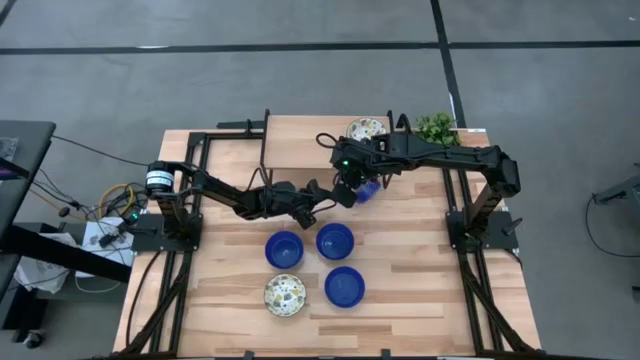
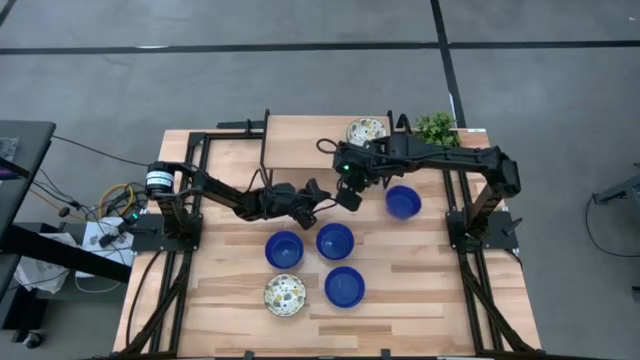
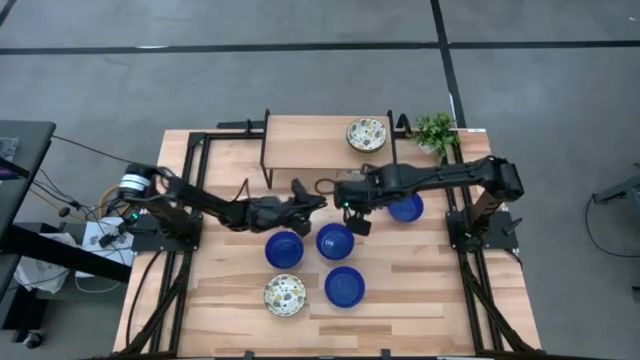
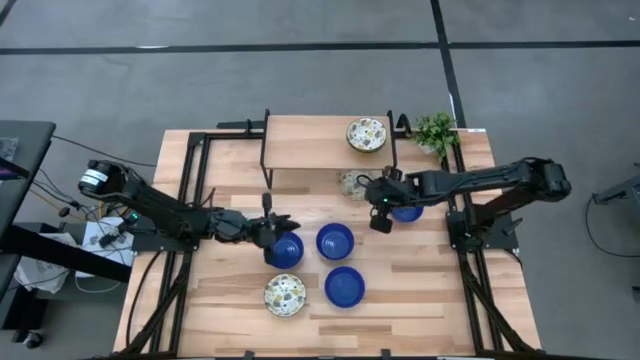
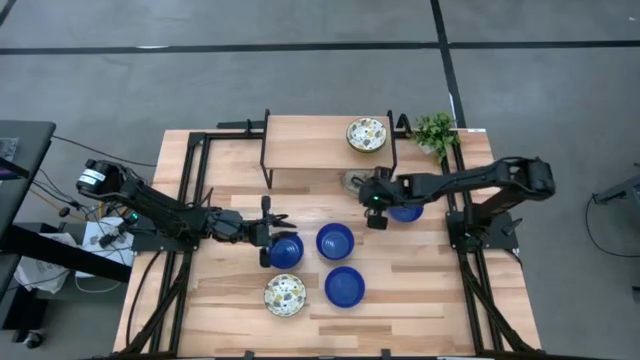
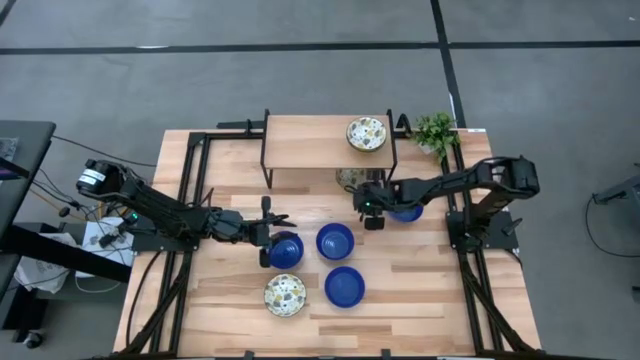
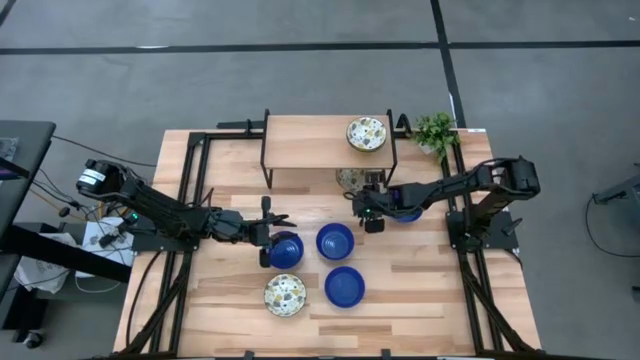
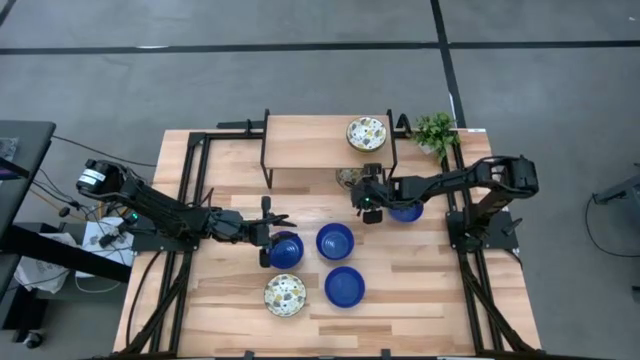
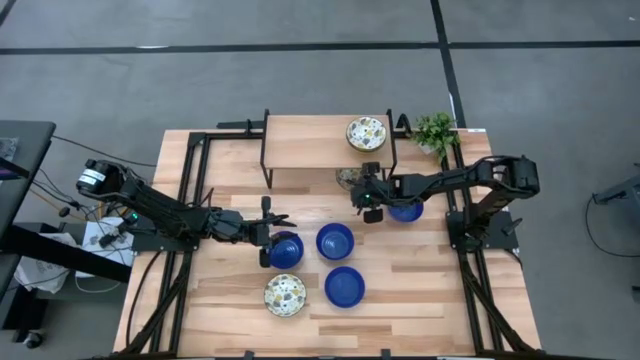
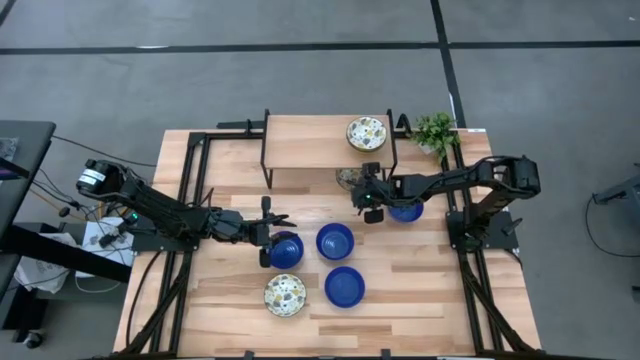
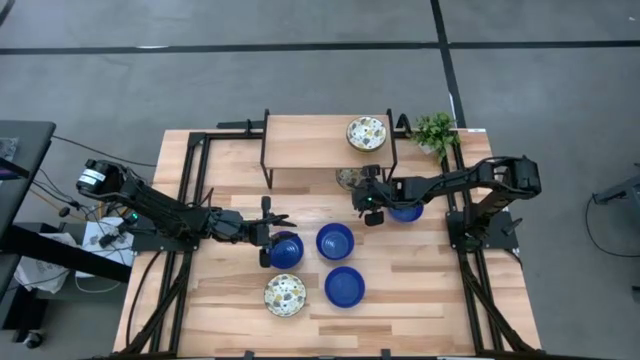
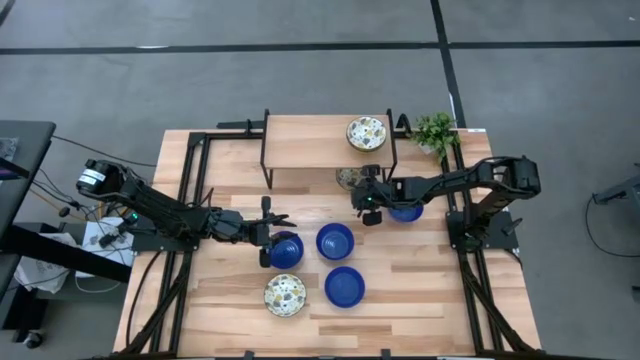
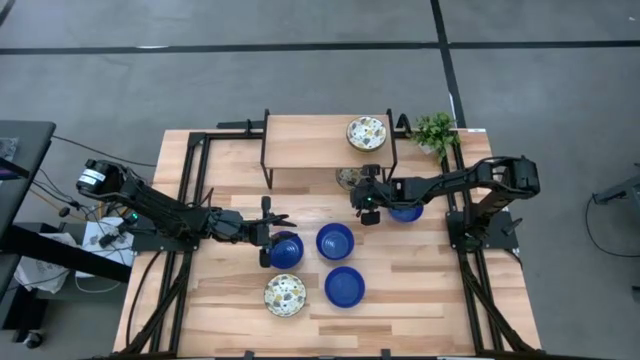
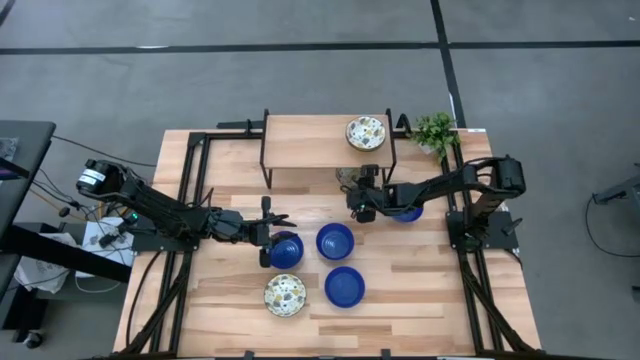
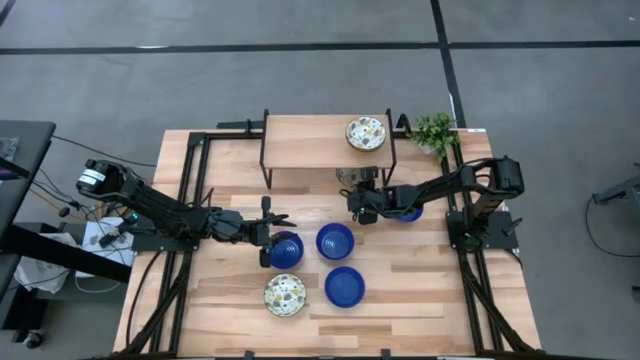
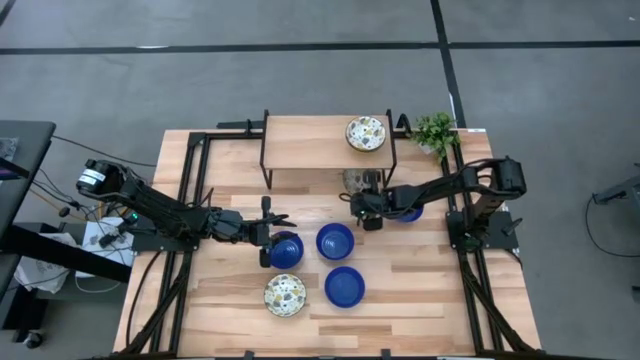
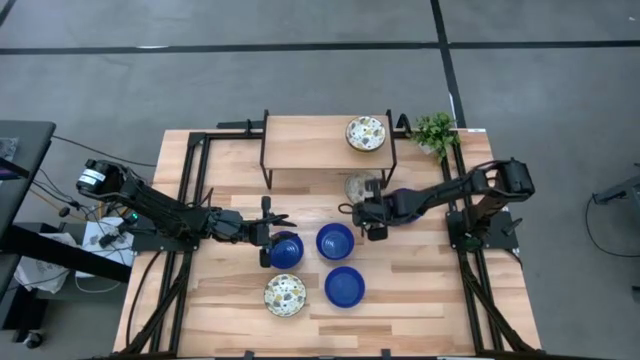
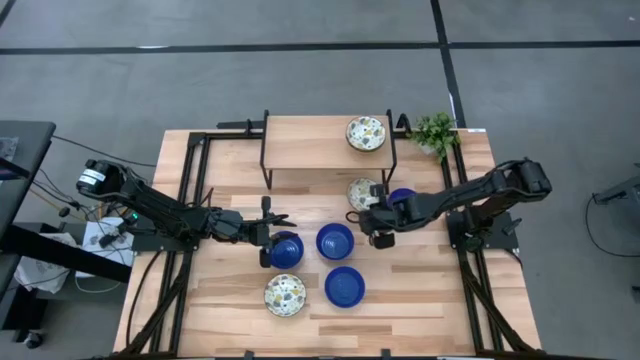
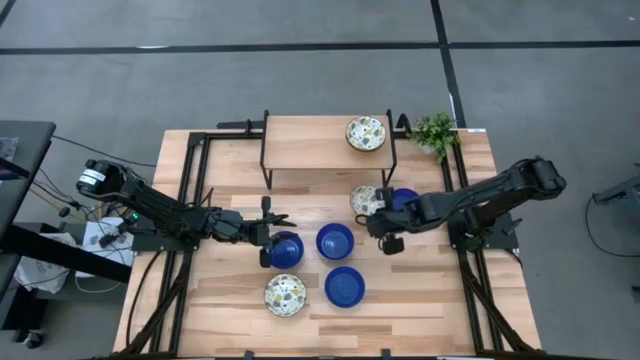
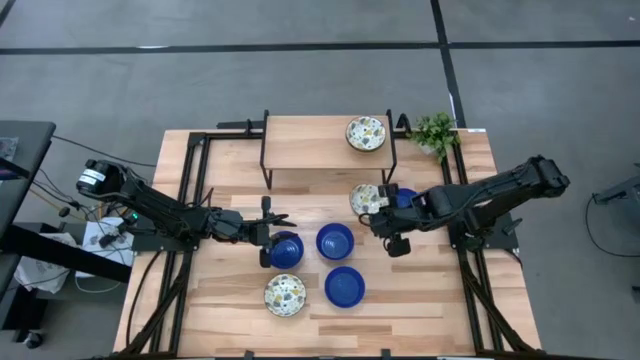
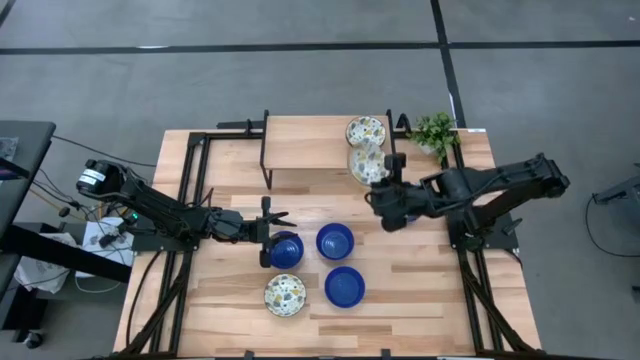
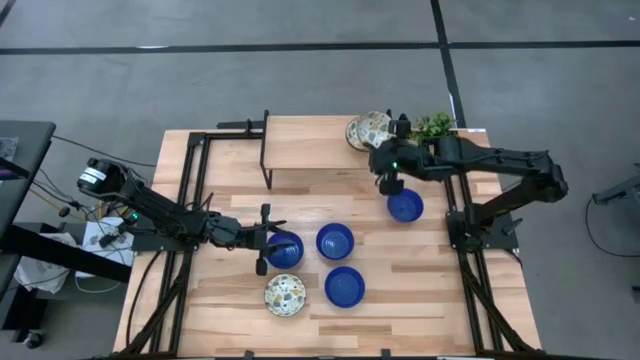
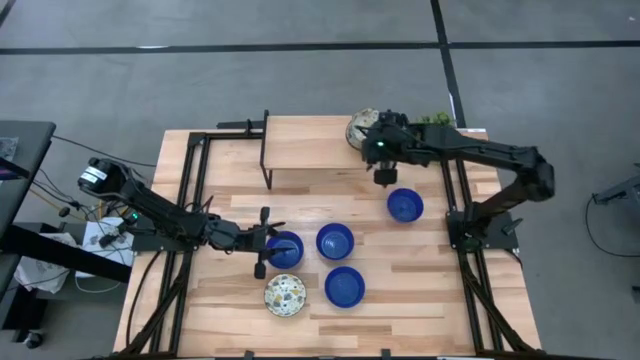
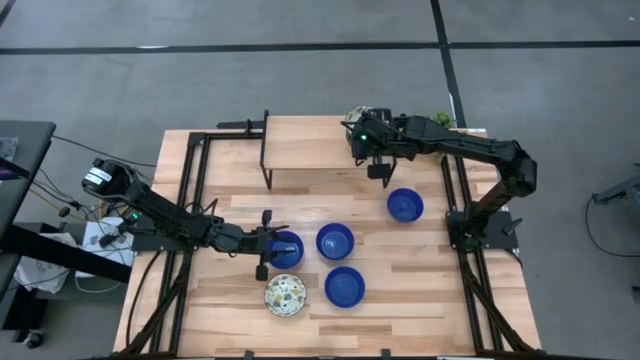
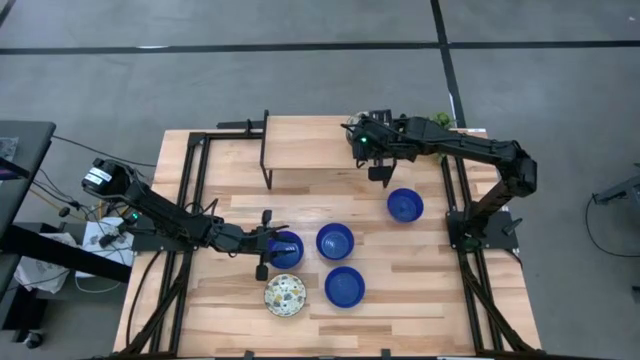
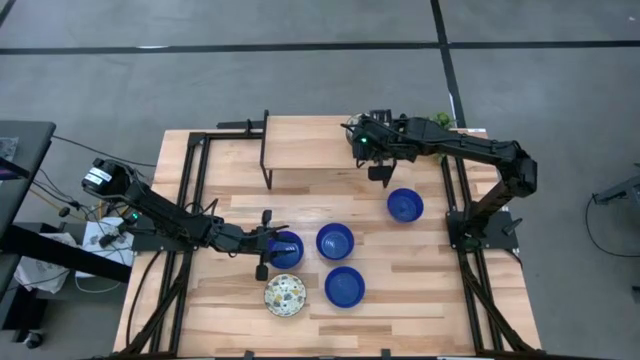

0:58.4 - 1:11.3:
Task: Pick & Place Mini bowls
Stack the yellow patterned bowl on top of the yellow patterned bowl on the shelf

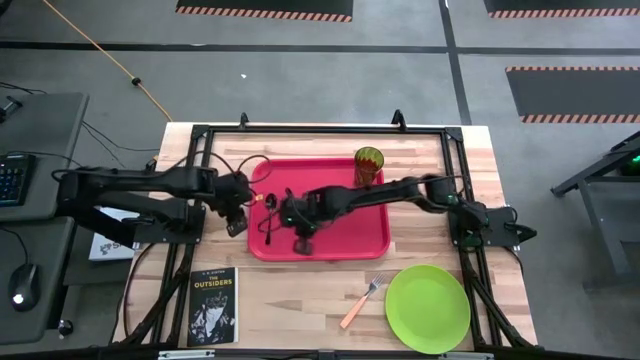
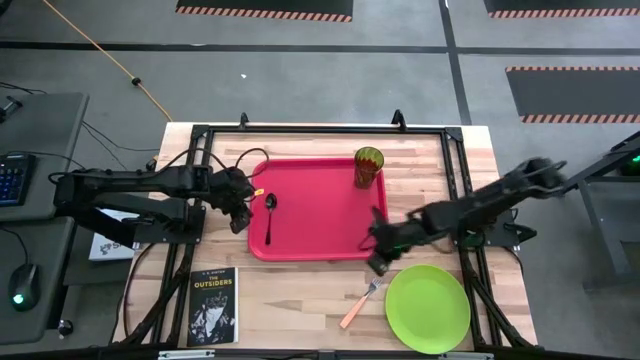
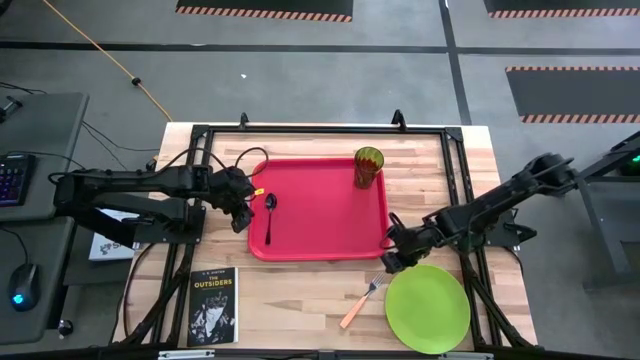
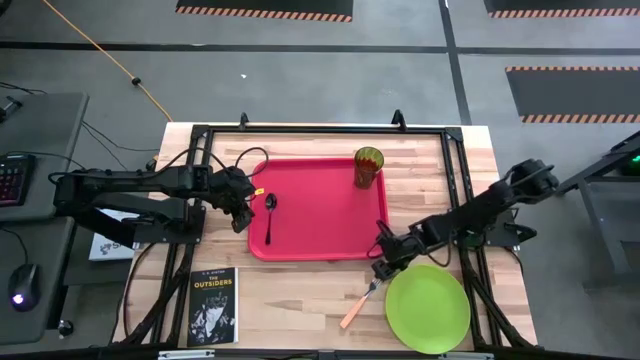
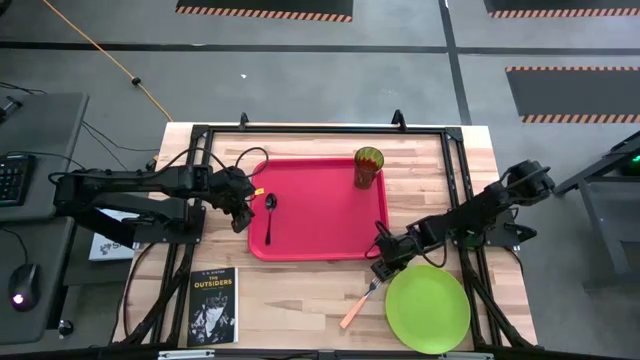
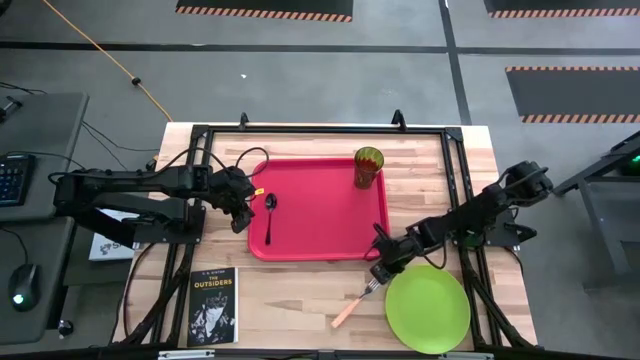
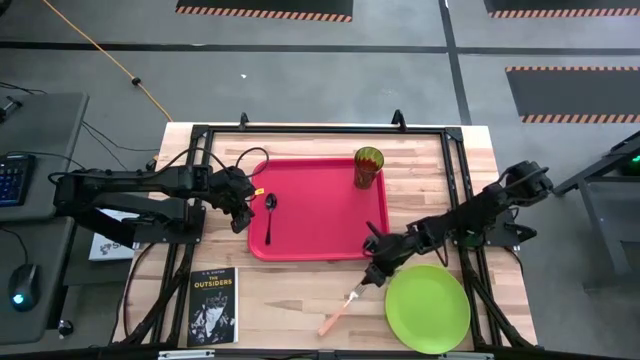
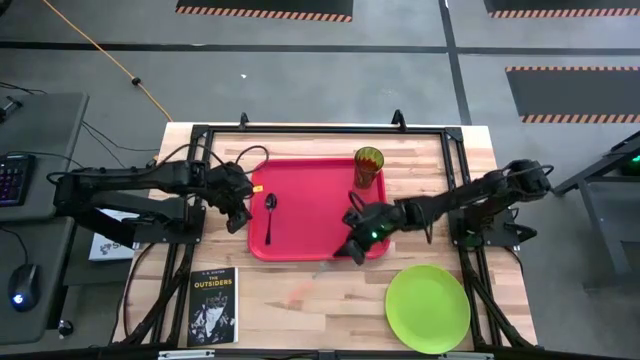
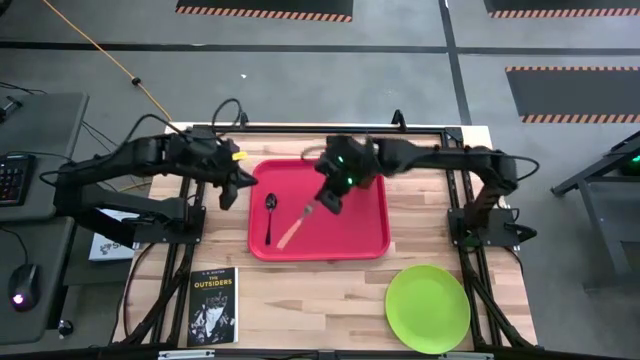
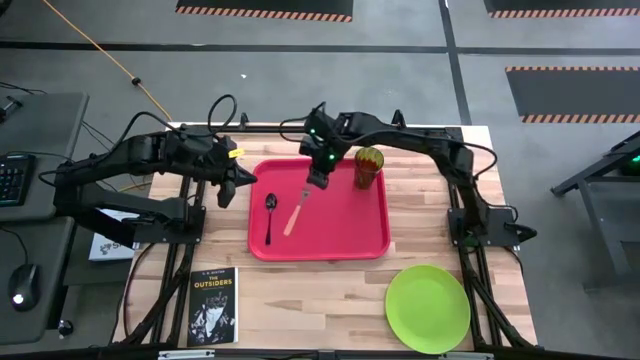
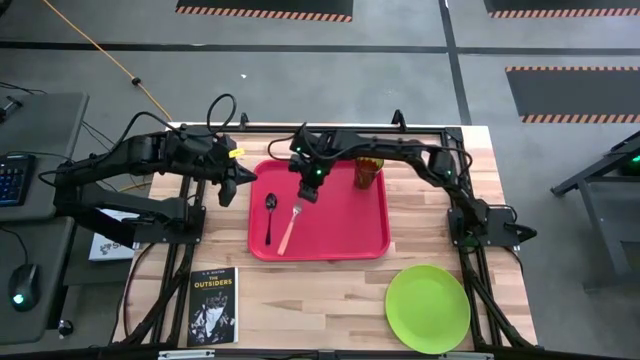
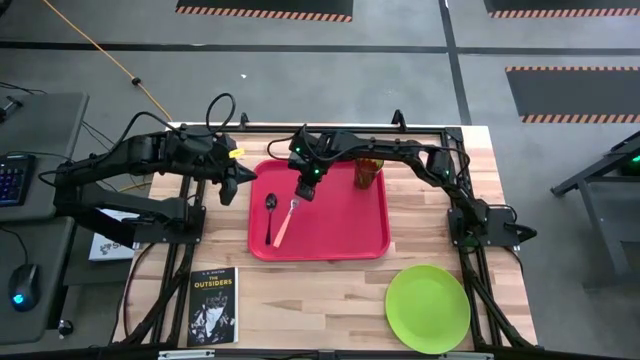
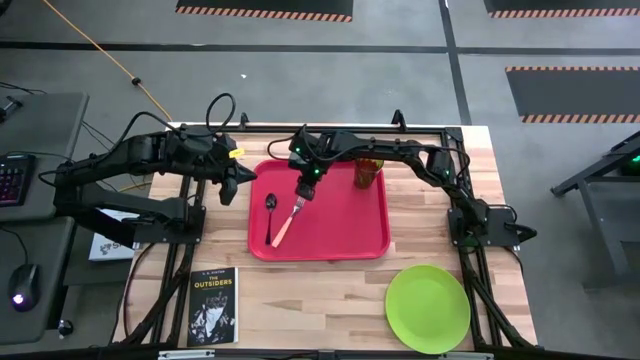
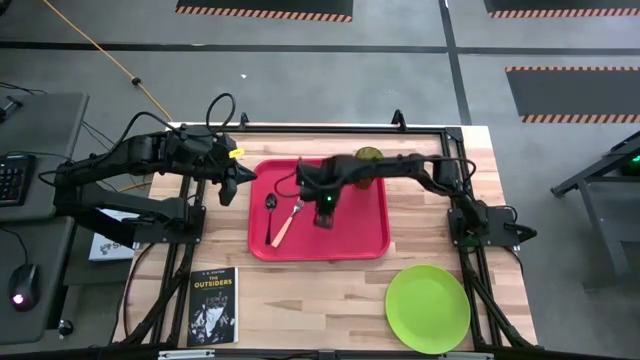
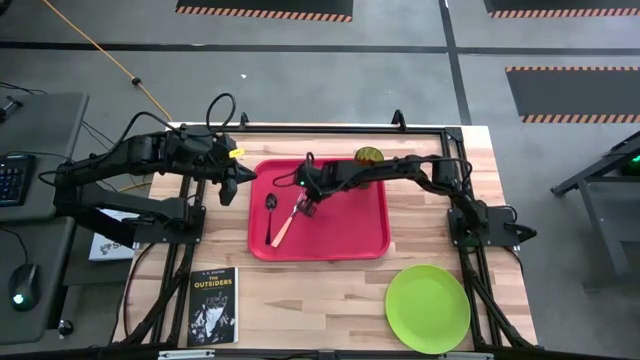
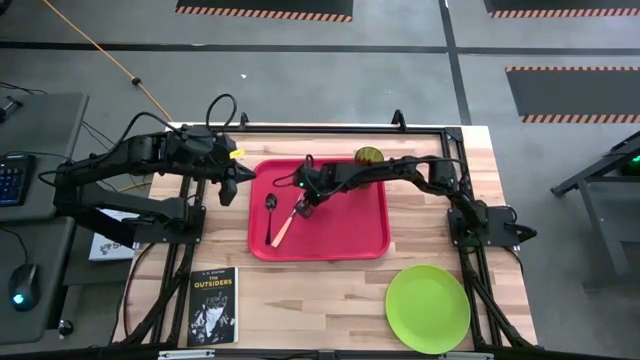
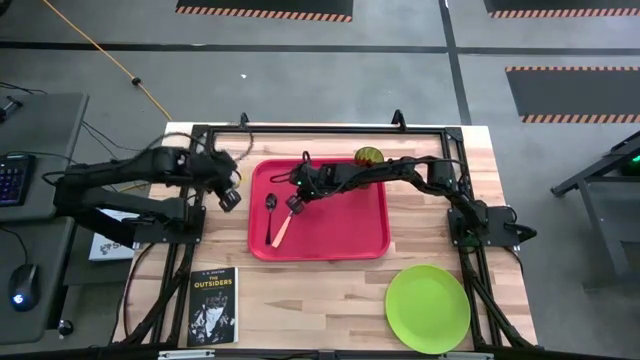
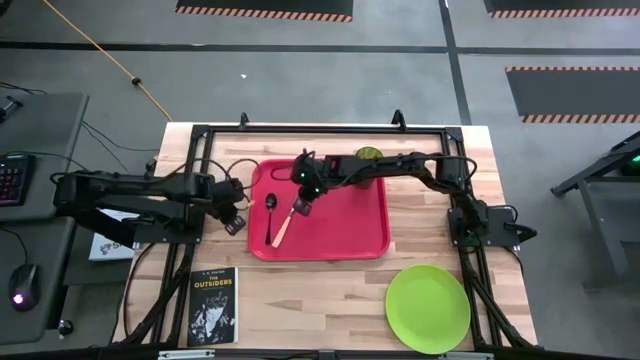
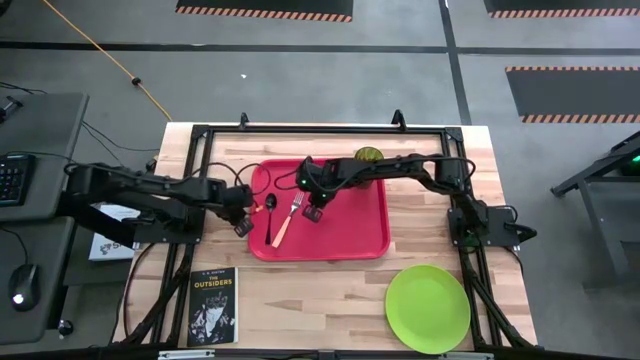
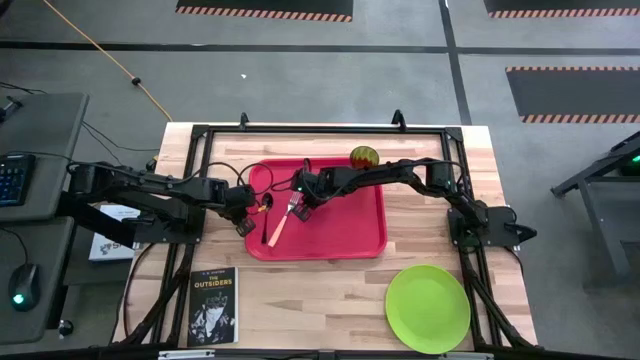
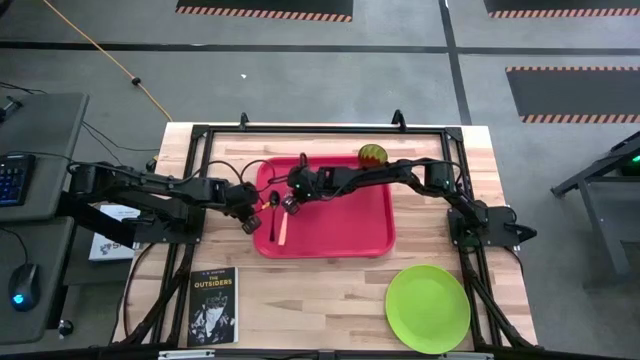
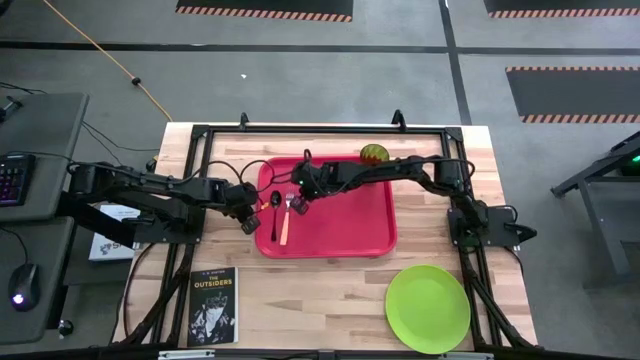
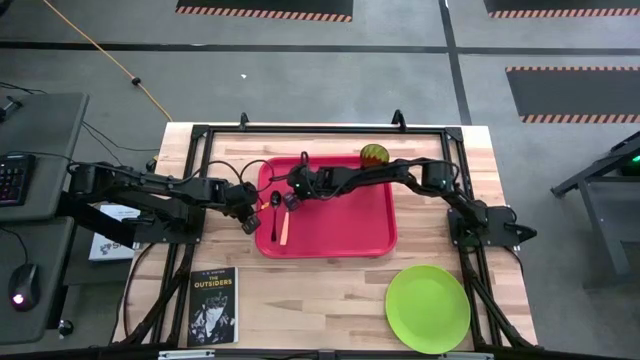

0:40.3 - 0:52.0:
Task: Pick and place plate/cup/fork/spoon on tray
Put the orange fork to the right side of the black spoon on the red tray
